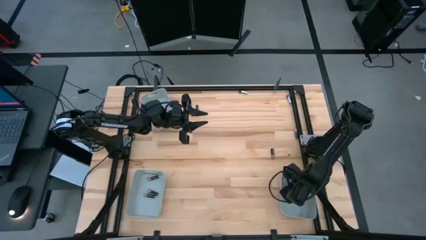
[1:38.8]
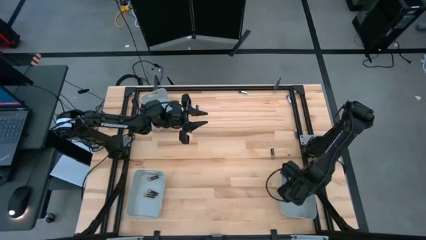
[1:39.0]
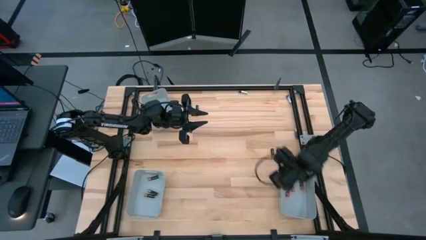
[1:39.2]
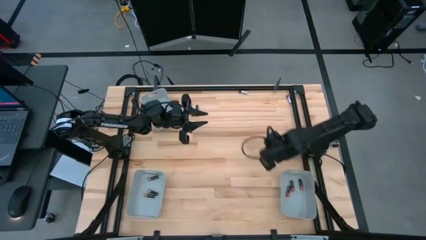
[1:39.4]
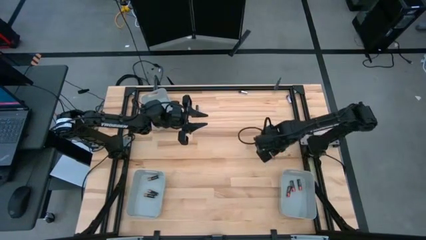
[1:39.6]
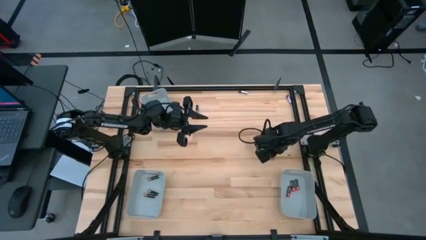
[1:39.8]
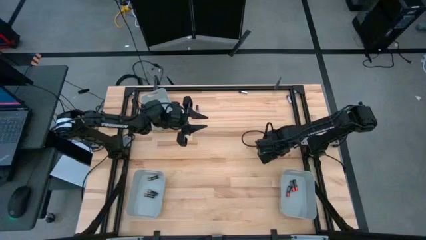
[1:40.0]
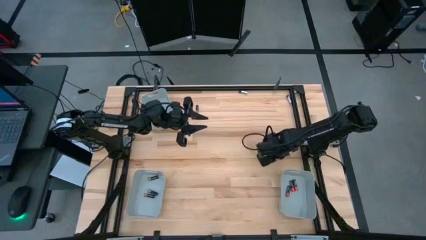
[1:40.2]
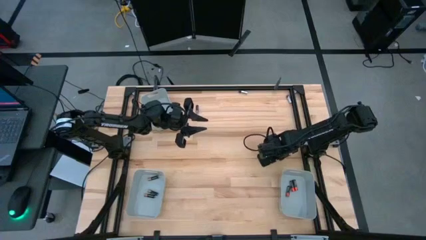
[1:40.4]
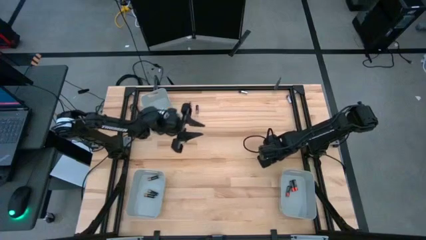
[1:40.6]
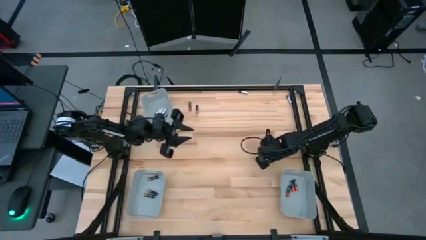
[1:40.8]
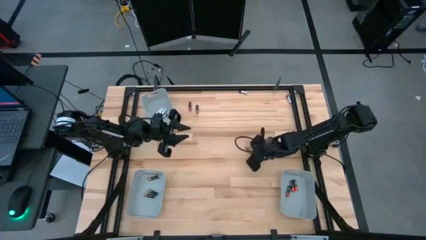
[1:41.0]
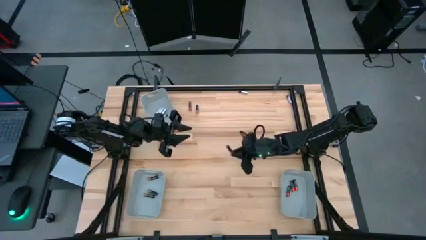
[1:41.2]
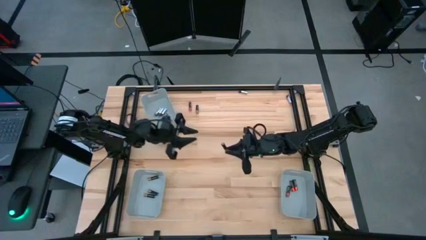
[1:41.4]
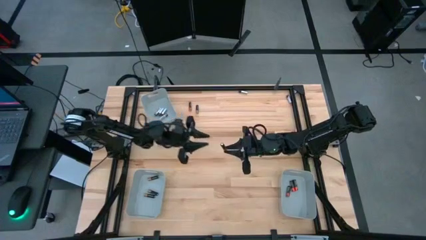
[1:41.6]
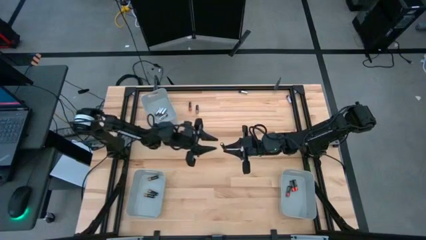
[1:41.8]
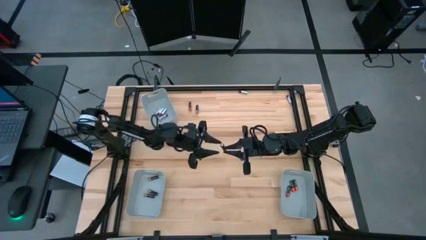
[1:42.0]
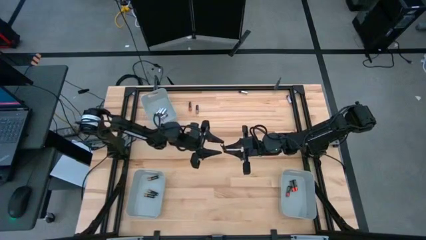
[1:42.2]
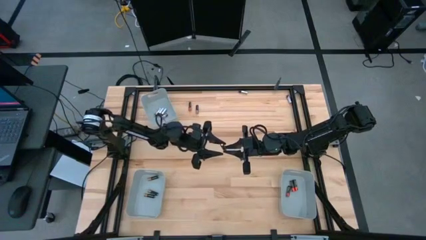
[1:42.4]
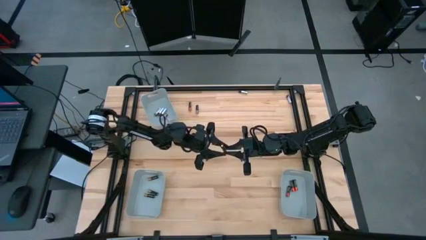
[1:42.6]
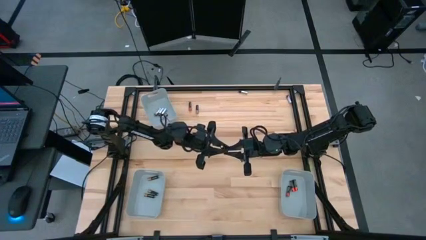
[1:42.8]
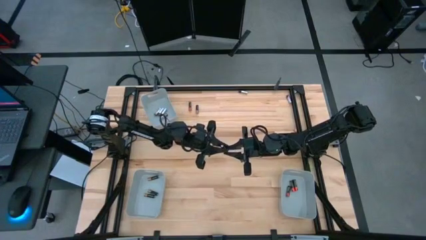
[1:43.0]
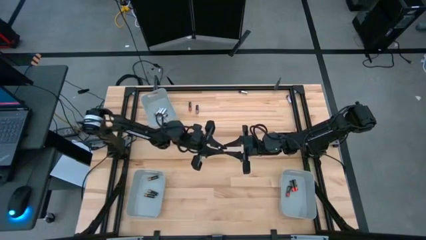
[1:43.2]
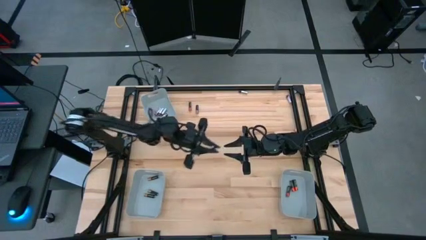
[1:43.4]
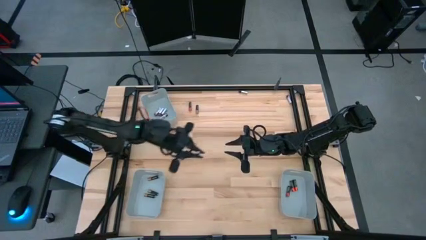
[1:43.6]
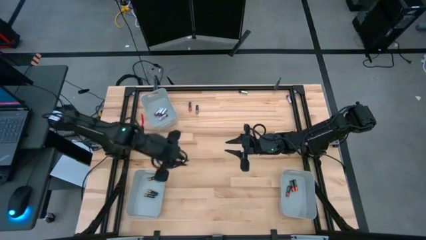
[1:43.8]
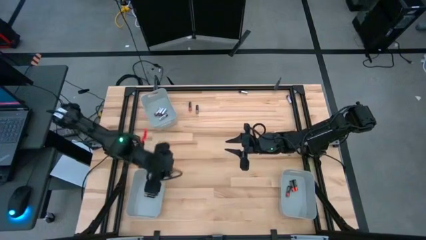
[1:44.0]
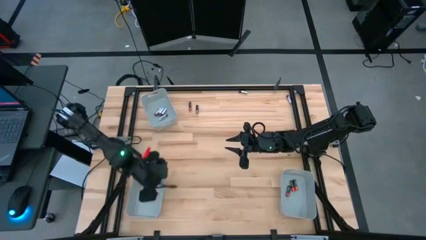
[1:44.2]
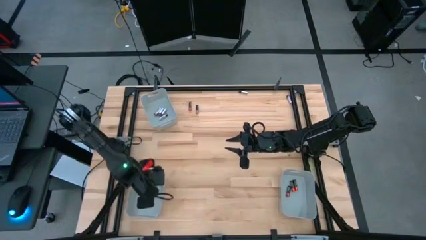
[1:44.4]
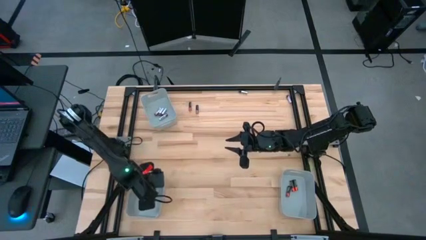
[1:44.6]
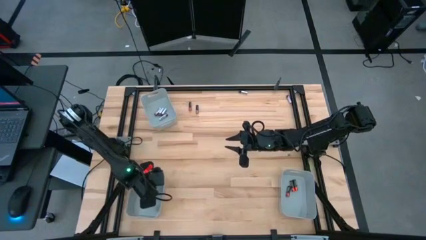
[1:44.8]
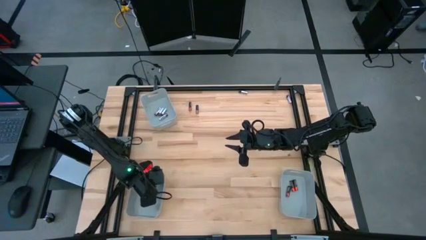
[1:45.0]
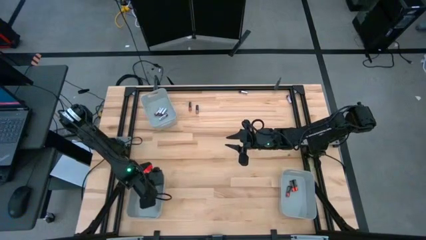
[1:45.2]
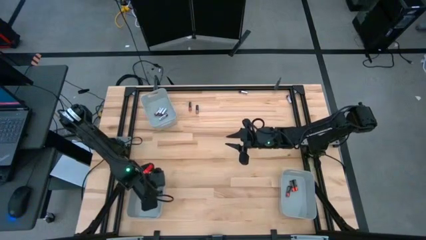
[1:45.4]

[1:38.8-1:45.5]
Task: Sort batteries
Put the black-brown battery into the bottom left gray bin

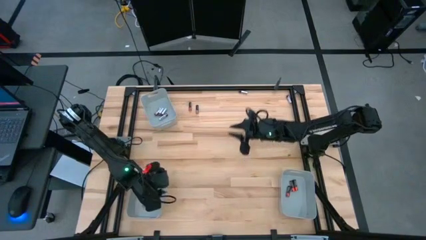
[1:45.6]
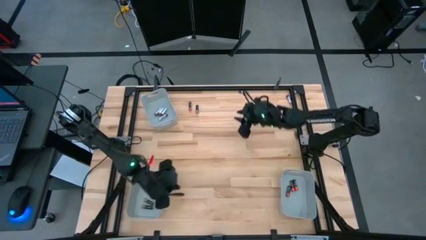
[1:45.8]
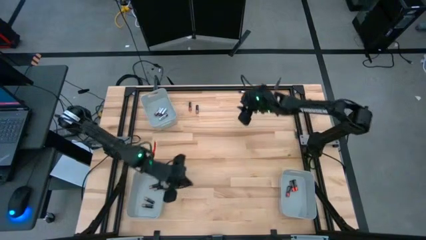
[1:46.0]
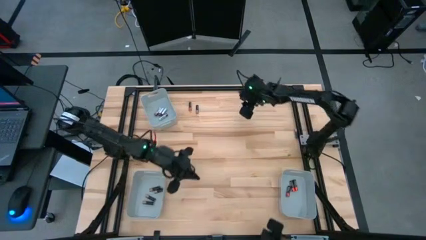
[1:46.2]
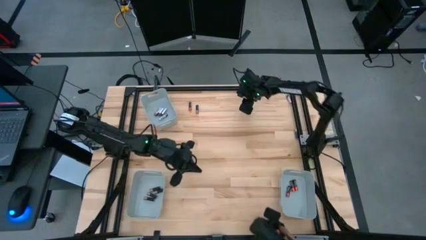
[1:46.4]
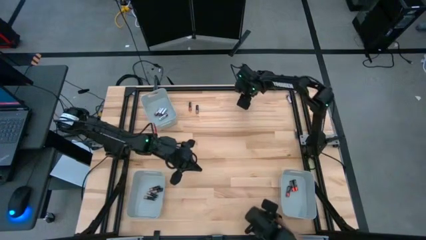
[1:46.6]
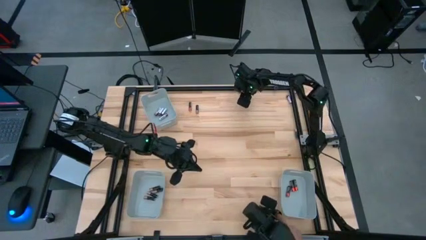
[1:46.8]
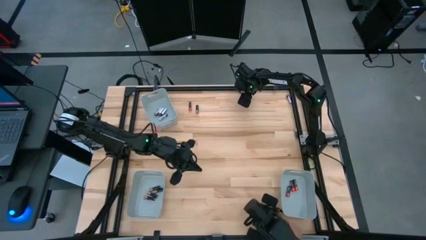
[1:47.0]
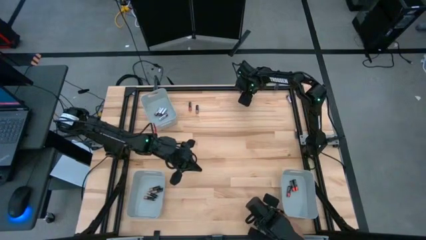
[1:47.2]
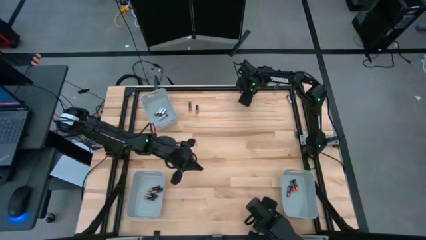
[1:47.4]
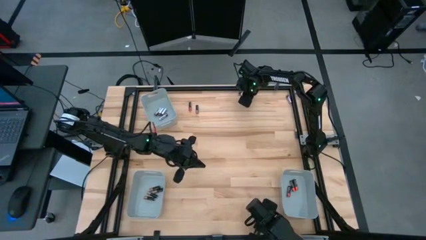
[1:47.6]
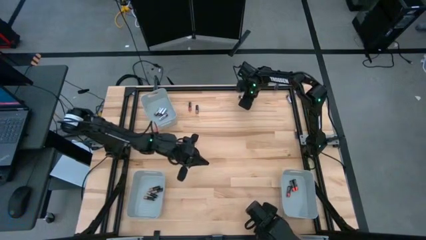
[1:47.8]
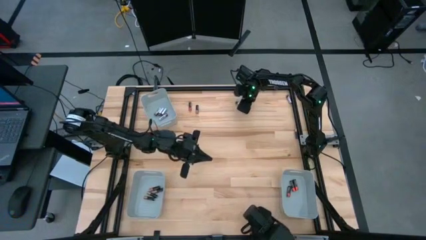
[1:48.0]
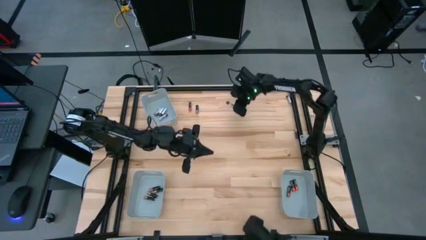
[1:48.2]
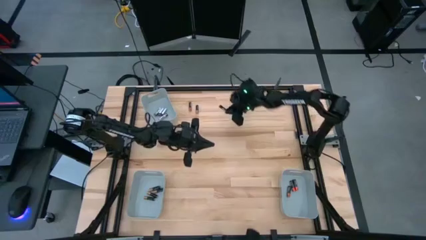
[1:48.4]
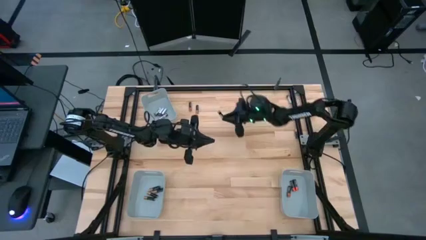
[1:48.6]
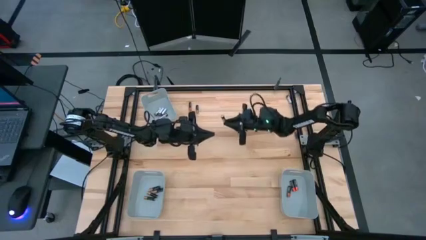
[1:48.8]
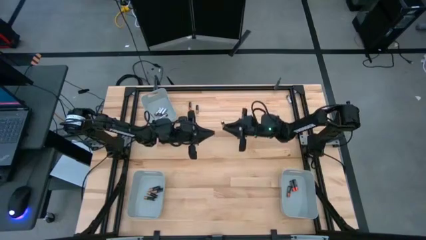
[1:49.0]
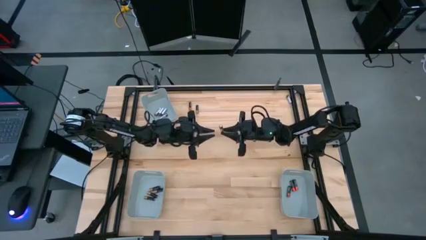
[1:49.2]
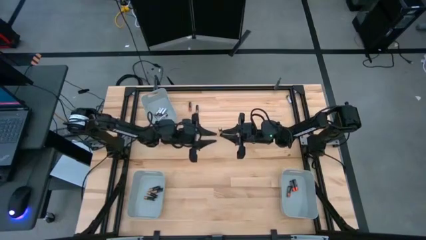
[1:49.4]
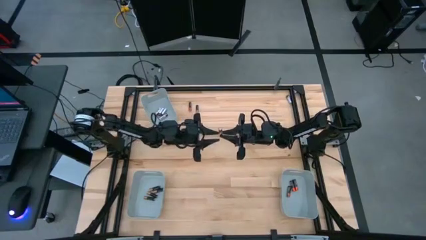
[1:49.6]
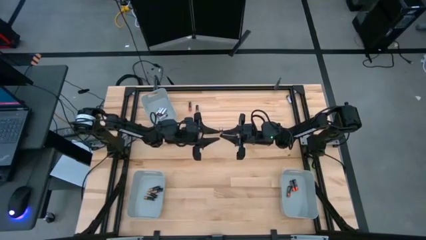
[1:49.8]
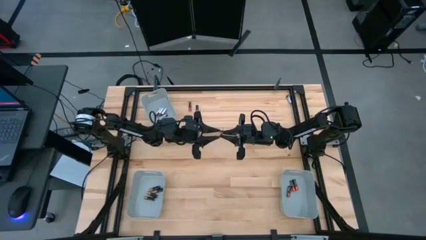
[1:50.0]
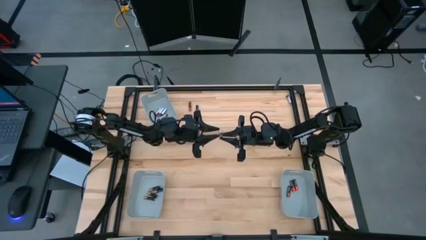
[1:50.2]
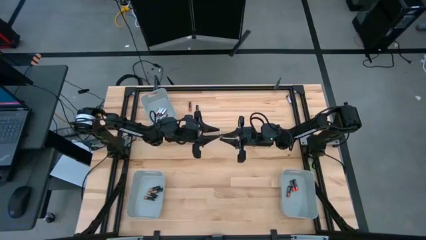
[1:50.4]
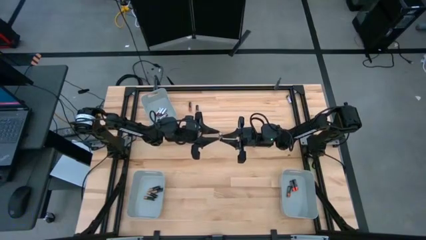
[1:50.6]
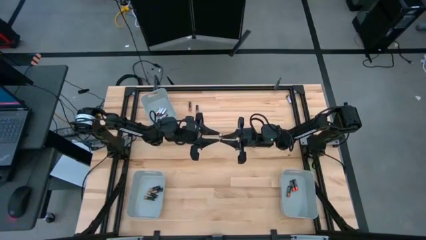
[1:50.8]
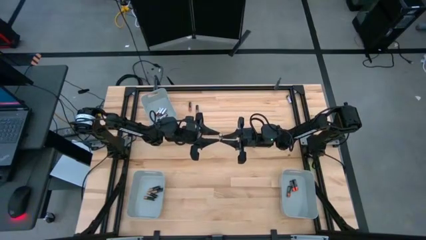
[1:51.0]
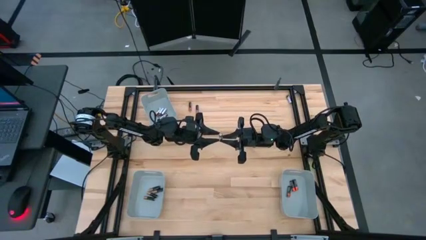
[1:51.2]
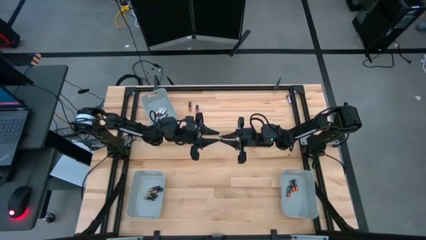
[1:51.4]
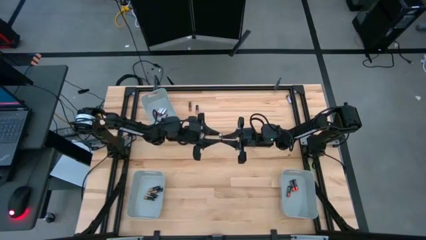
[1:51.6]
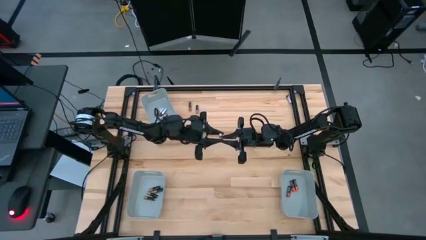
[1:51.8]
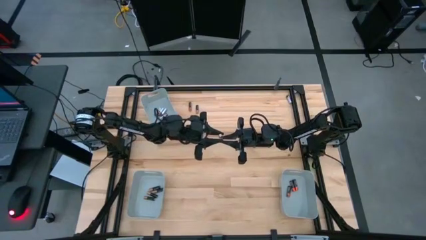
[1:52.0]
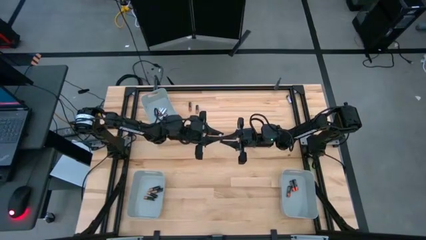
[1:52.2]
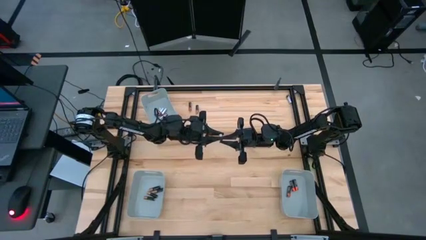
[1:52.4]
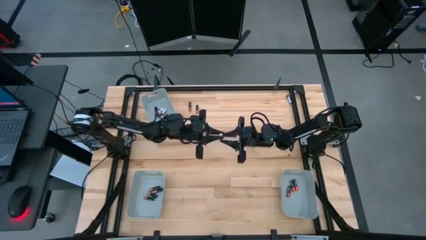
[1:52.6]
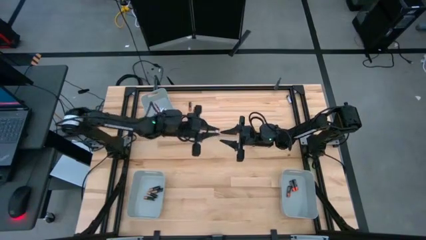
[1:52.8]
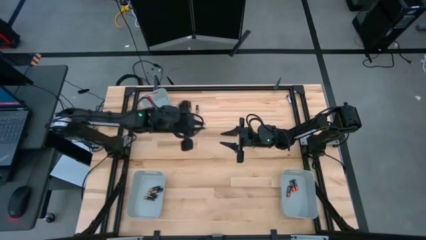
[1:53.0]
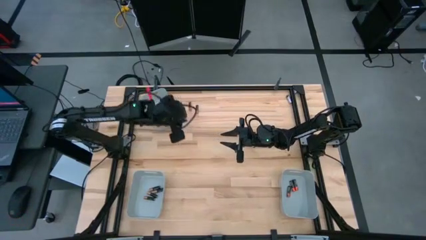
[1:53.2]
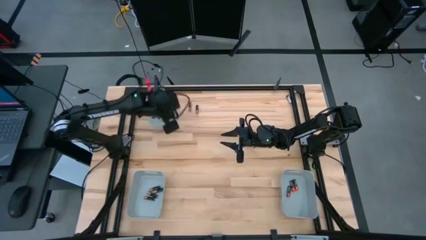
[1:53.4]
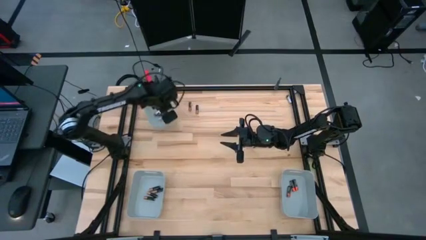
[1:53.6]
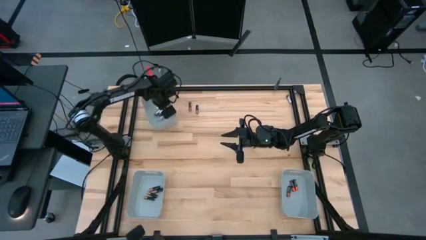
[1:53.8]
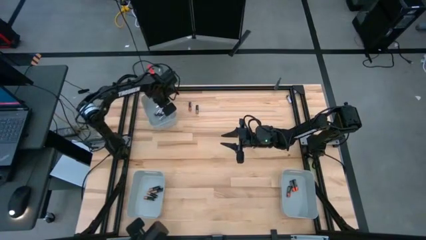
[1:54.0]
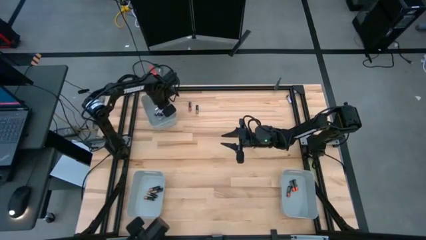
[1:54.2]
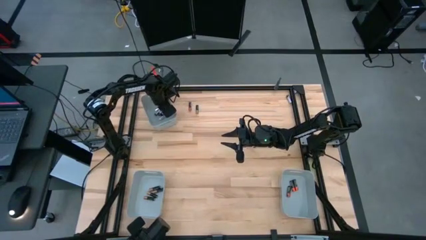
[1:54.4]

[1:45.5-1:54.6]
Put the silver battery into the top left gray bin
